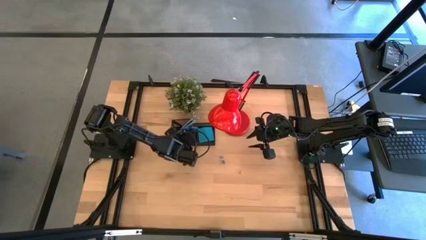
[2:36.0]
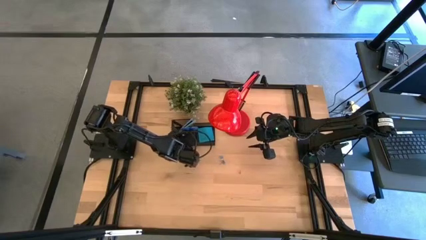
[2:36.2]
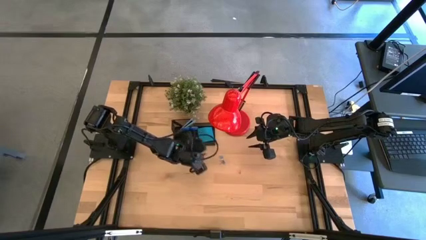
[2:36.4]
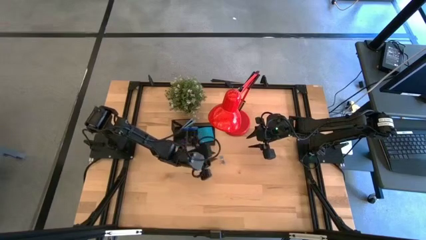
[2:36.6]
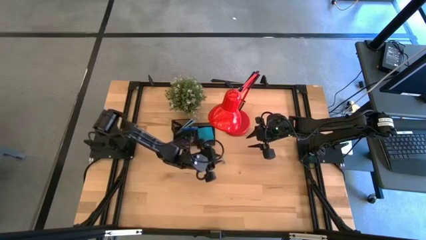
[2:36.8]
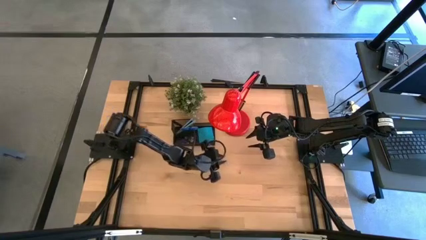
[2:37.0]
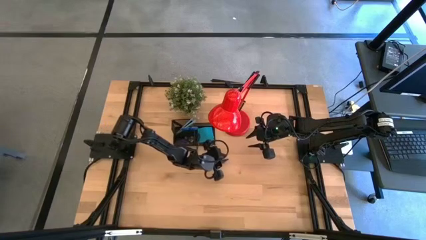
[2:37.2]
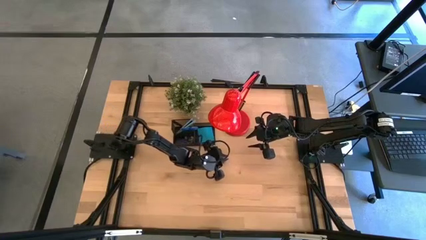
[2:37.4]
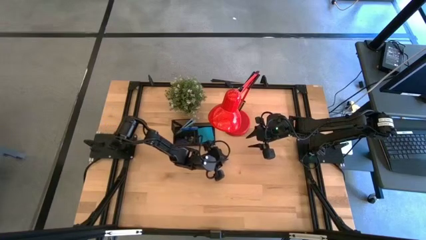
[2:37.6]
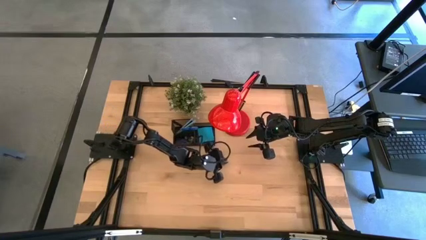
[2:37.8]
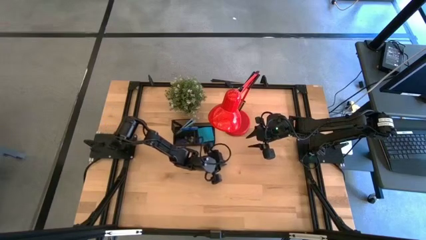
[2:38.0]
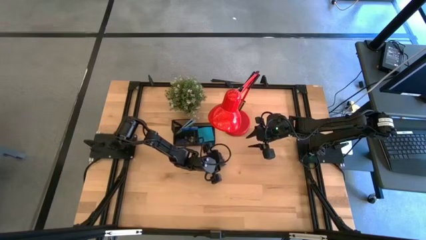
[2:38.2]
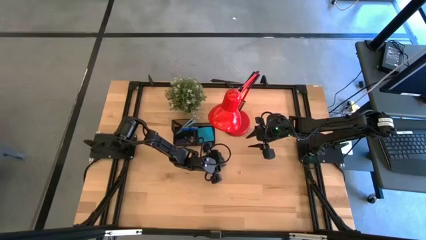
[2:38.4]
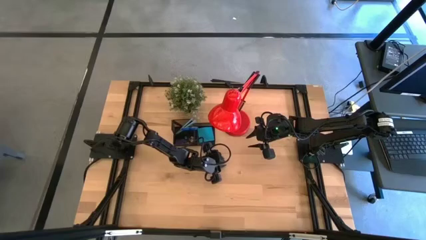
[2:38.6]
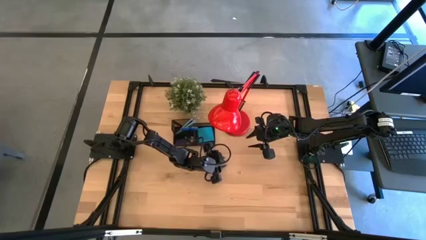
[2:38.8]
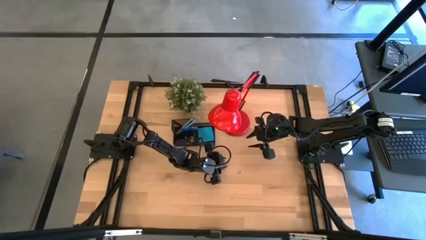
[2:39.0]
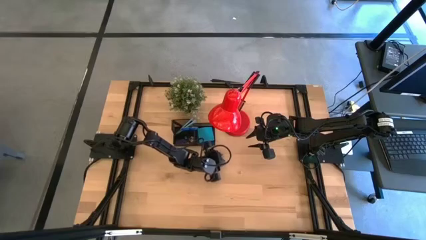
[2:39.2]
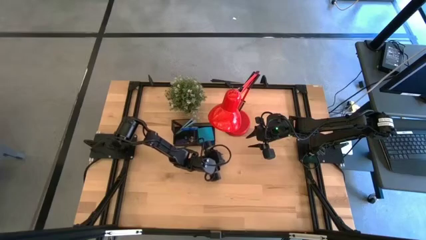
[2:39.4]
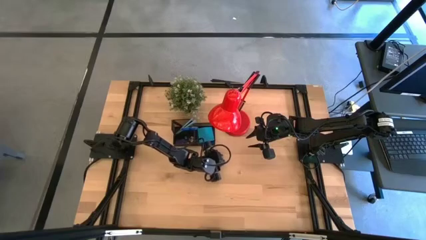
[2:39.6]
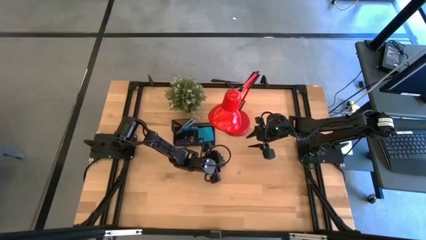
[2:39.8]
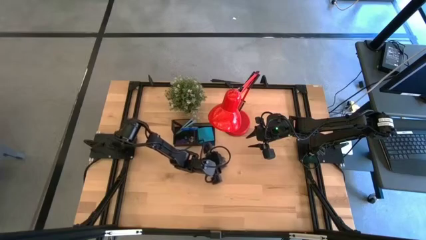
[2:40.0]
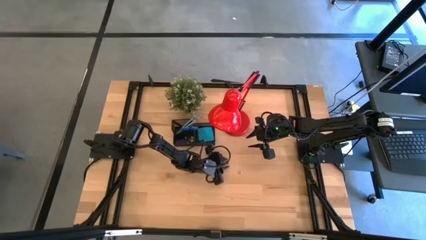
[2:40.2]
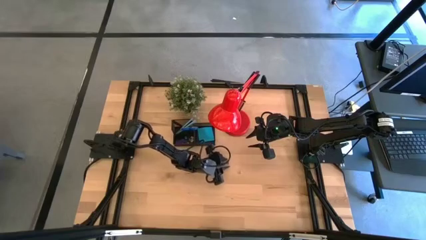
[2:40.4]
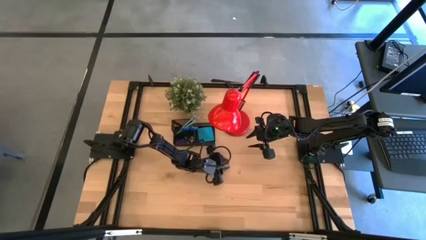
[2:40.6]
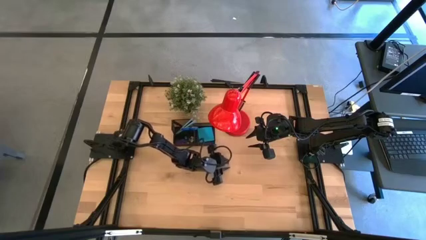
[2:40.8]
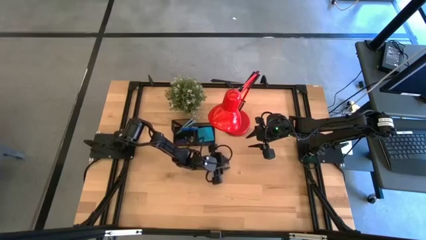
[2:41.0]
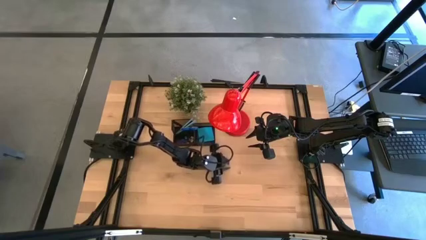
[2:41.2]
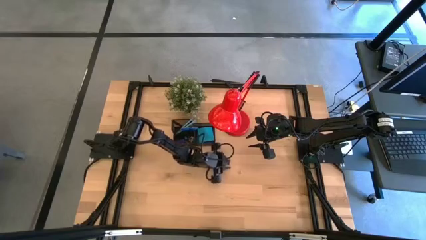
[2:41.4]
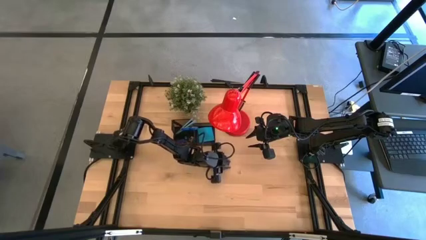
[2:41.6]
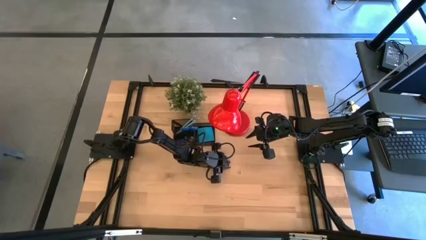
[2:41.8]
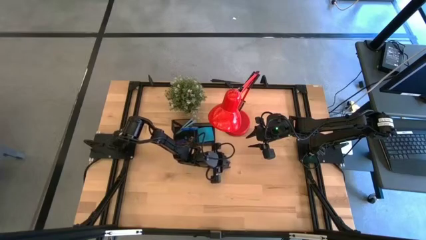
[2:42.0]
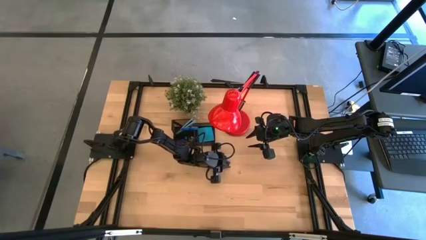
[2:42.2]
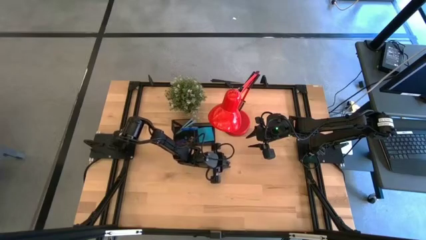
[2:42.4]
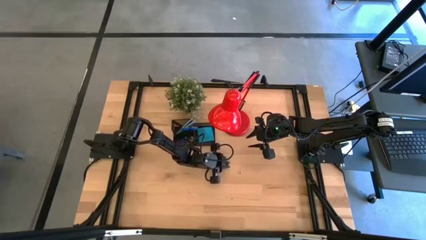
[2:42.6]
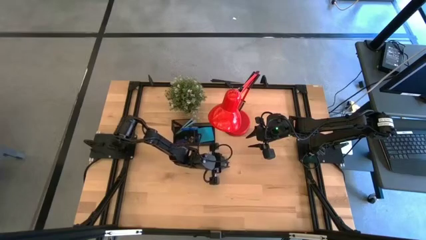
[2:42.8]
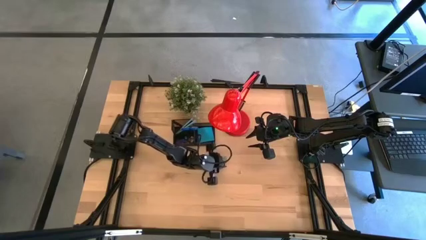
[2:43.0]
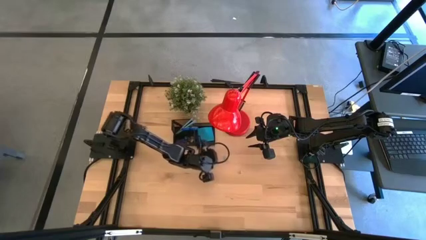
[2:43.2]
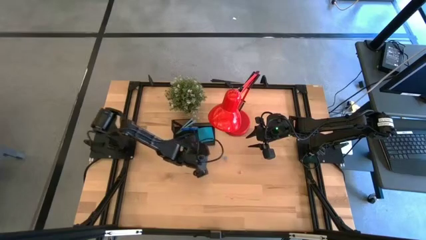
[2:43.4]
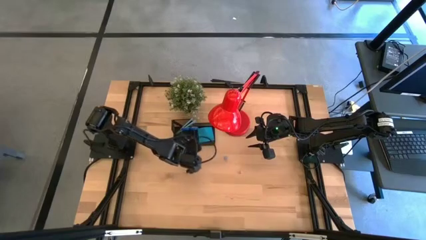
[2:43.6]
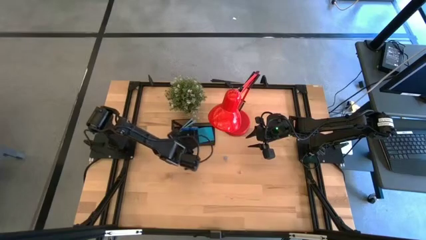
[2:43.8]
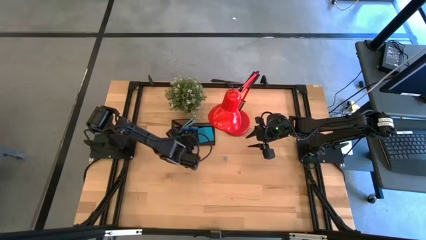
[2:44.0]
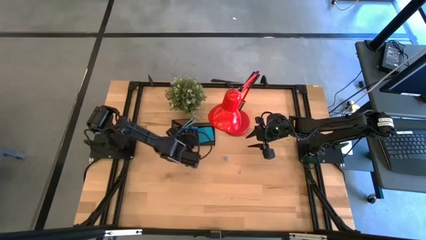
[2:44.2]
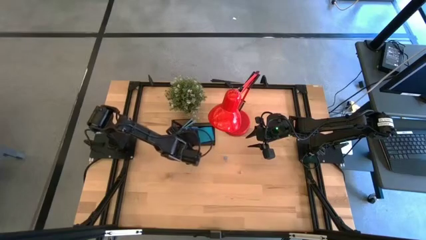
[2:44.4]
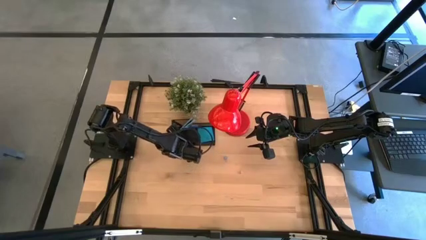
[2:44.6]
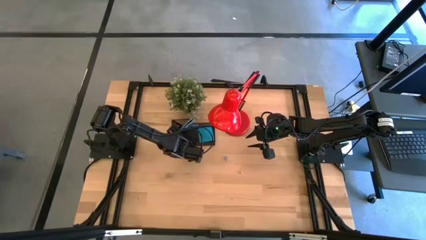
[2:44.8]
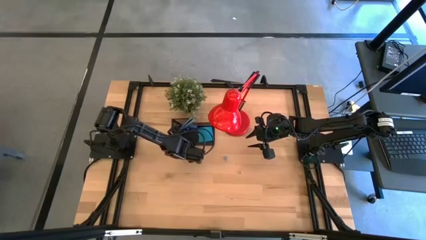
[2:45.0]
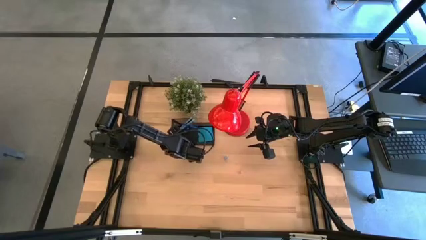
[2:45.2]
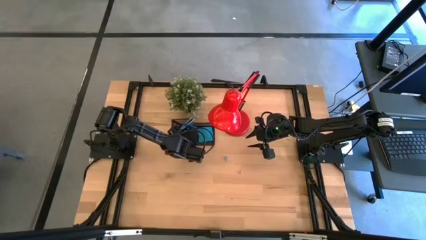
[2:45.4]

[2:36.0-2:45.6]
Task: Pick and place office supplies into organizer
Put the bottom blue binder clip into the black organizer box

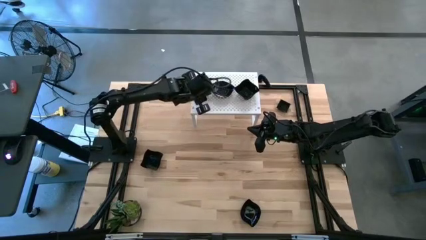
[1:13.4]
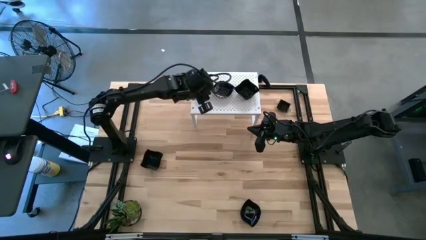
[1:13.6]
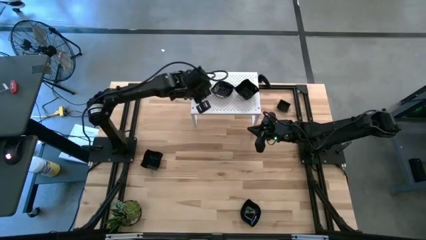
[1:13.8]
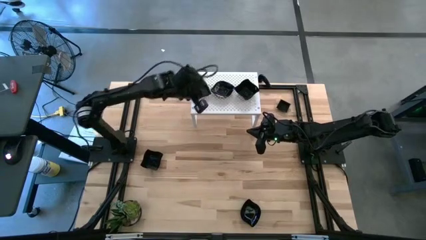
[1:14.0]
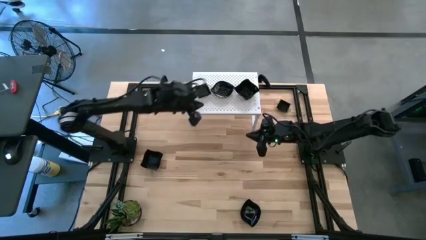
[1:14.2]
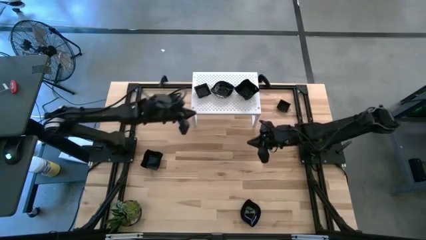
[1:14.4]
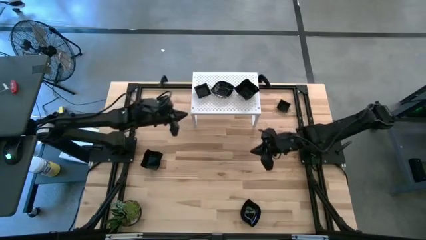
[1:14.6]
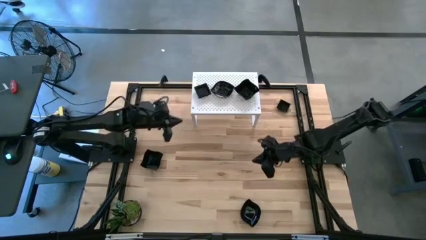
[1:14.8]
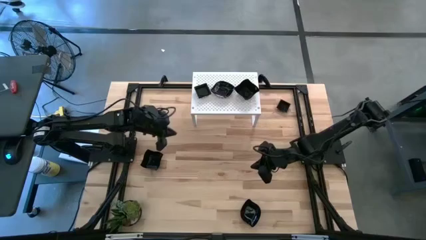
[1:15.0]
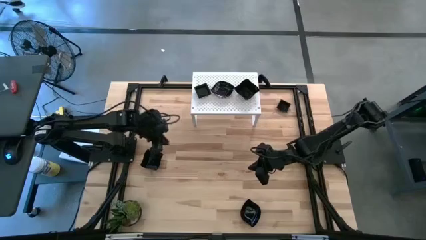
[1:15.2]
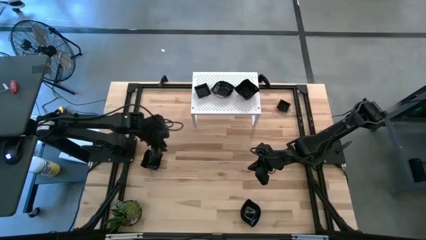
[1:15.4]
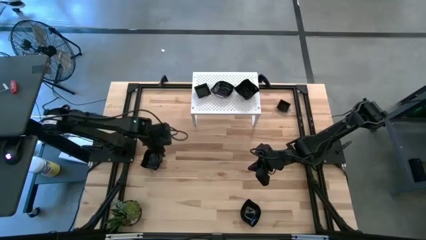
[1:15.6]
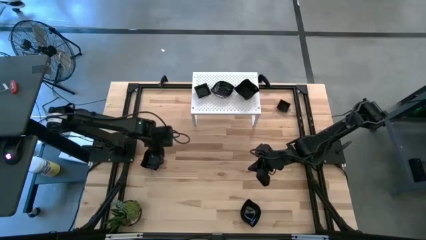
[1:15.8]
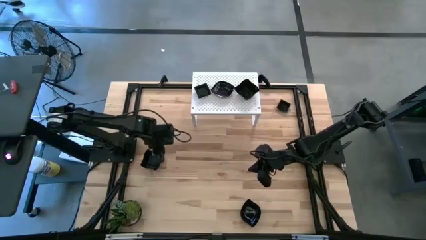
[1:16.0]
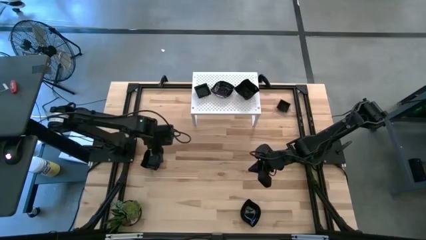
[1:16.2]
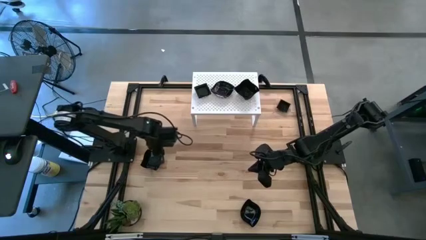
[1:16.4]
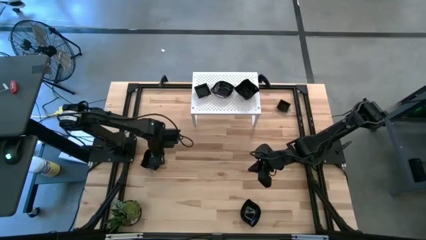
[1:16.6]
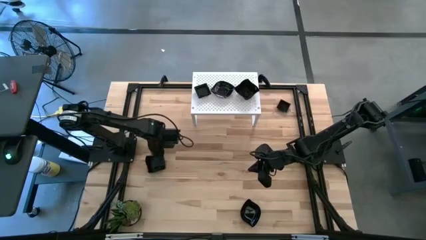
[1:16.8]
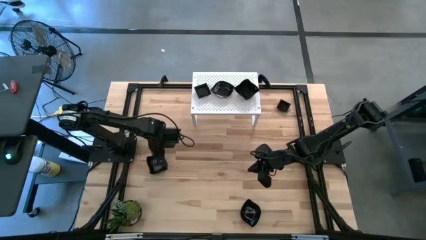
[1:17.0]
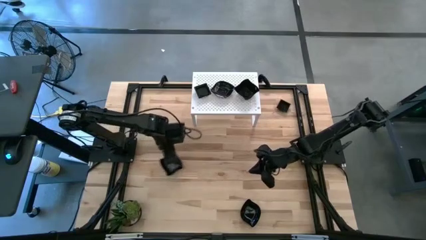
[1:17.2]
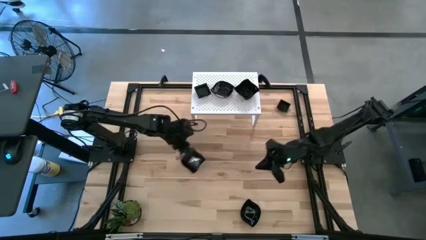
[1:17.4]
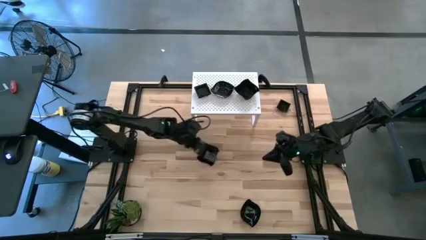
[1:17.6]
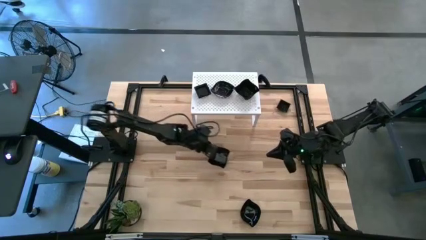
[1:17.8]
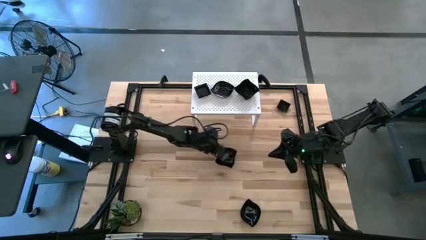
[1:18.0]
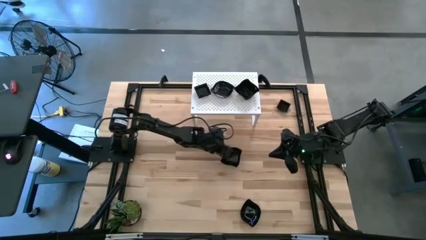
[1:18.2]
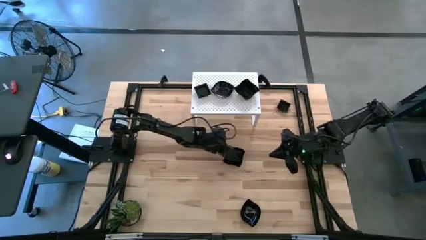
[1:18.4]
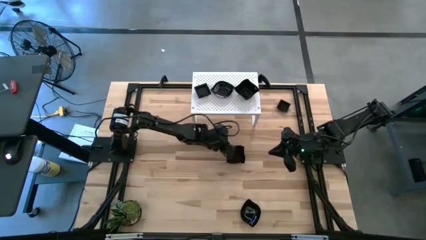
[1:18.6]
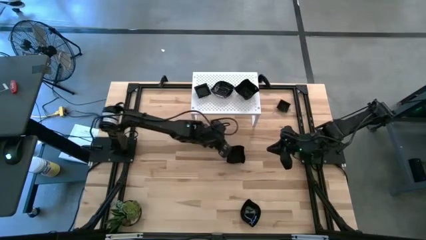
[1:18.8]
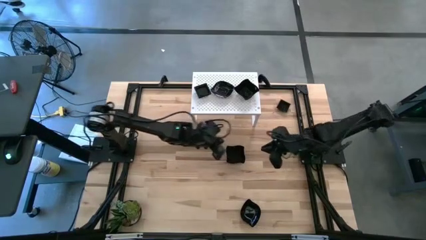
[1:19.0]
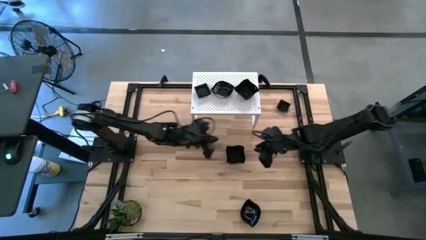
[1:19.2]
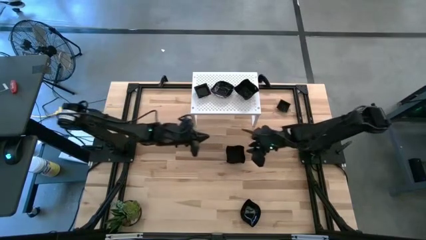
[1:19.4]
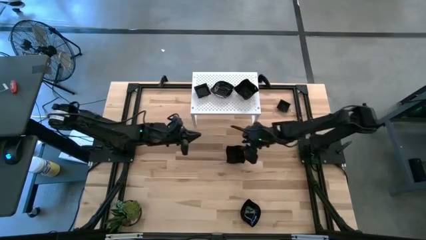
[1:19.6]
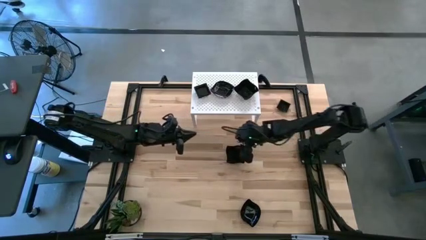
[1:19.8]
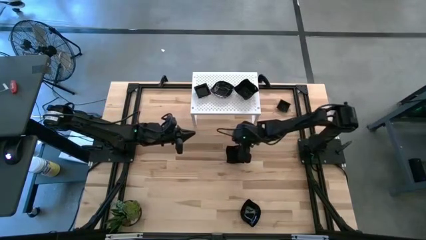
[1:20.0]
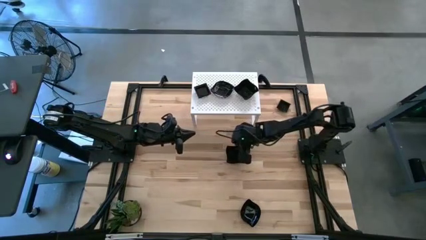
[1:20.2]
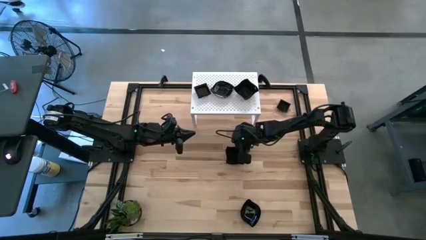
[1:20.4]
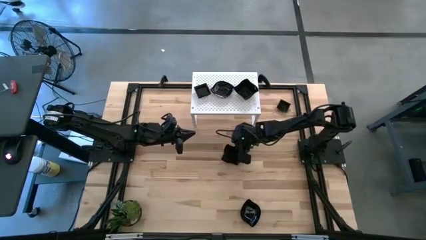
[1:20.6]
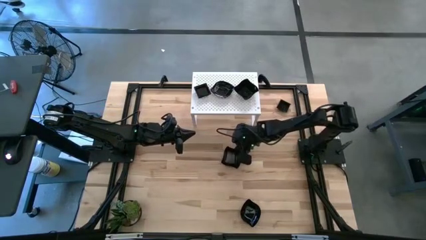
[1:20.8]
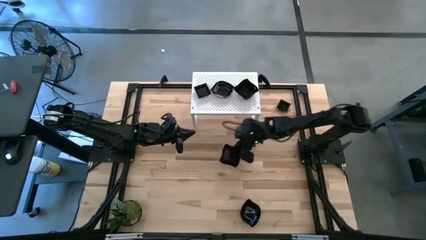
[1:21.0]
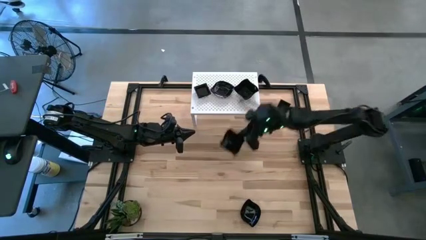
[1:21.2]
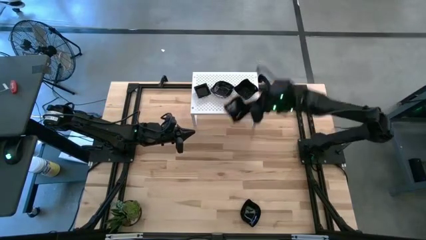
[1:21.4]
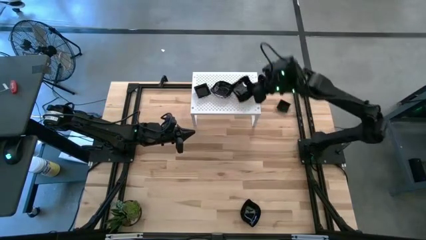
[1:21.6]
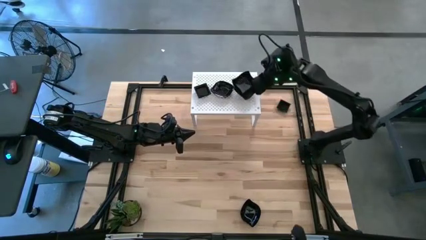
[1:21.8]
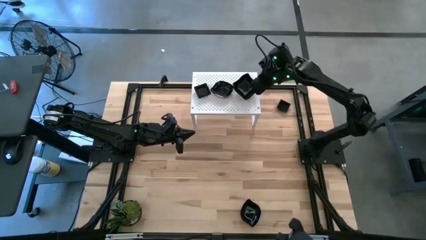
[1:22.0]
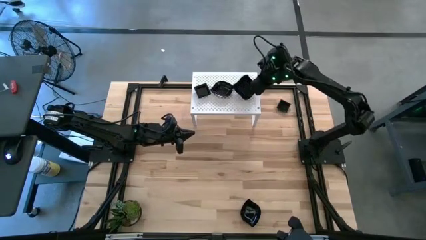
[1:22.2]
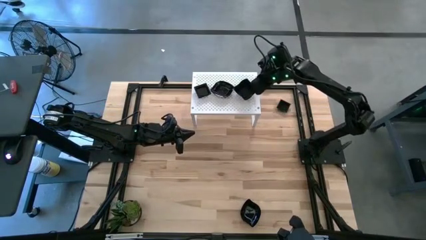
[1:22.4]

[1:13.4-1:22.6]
Task: Pick & Place Mini shaped plates
Stack the black distorted square plate on top of the black distorted square plate on the shelf
